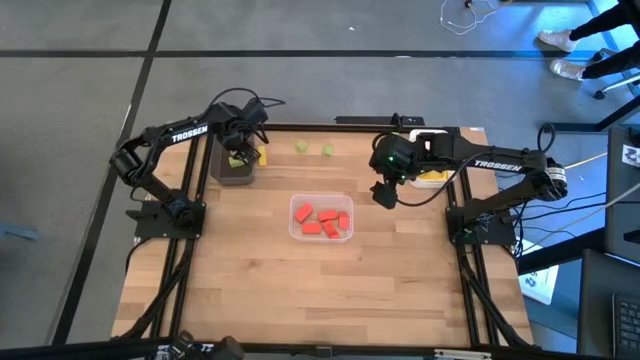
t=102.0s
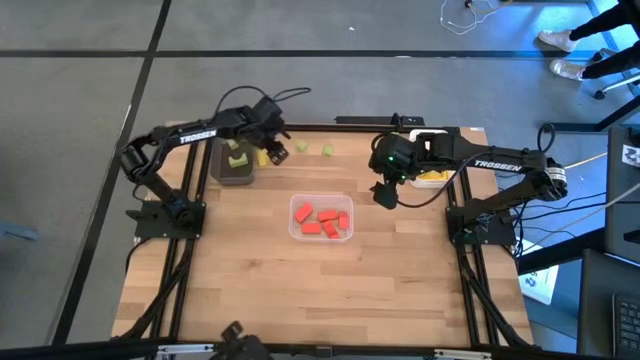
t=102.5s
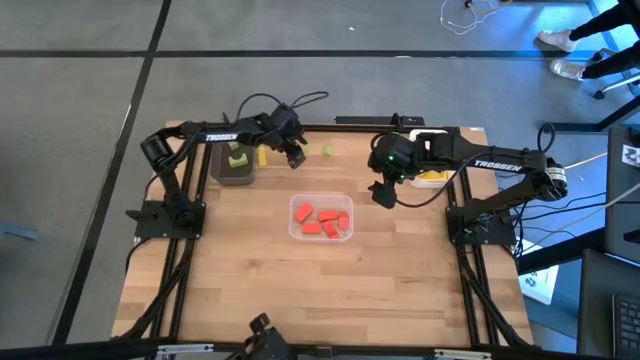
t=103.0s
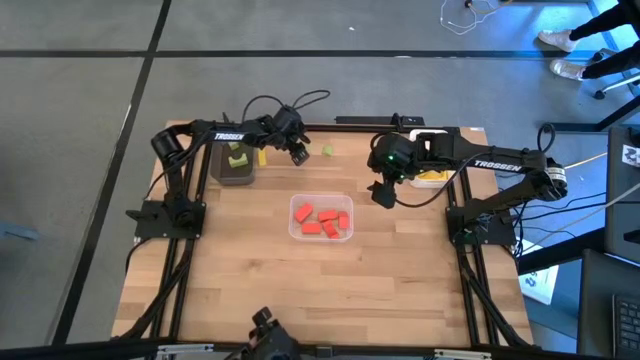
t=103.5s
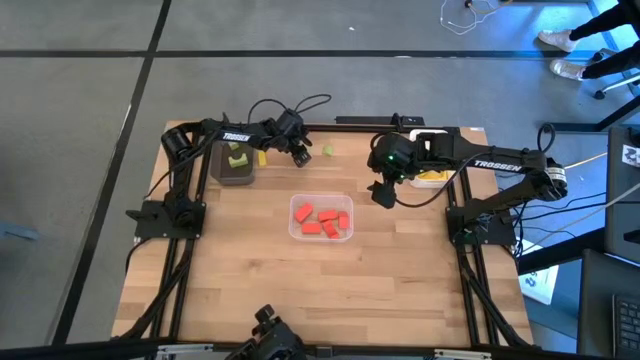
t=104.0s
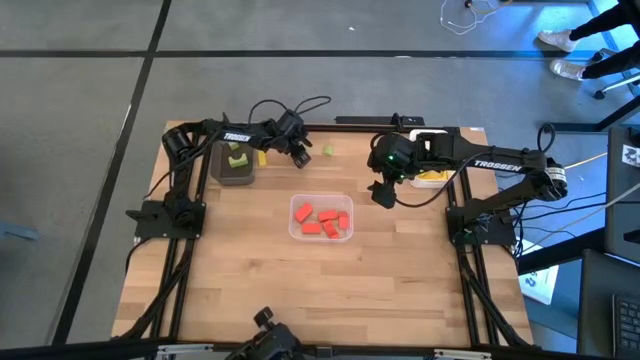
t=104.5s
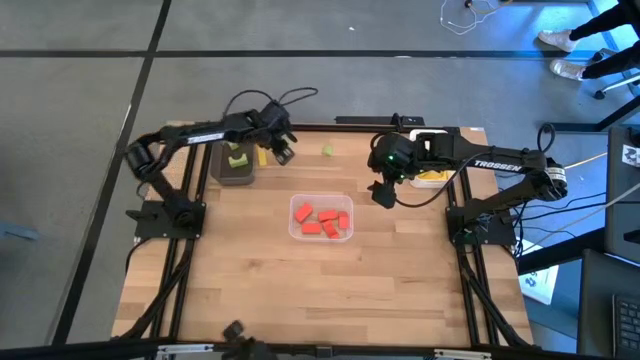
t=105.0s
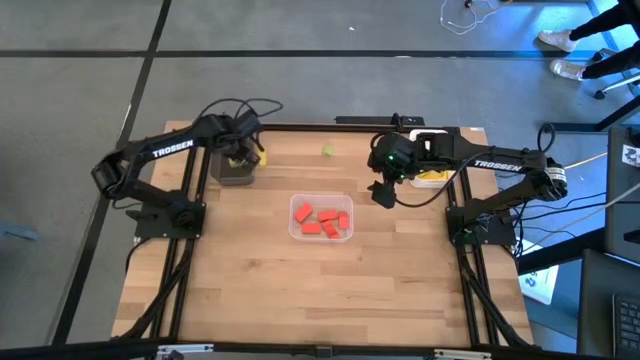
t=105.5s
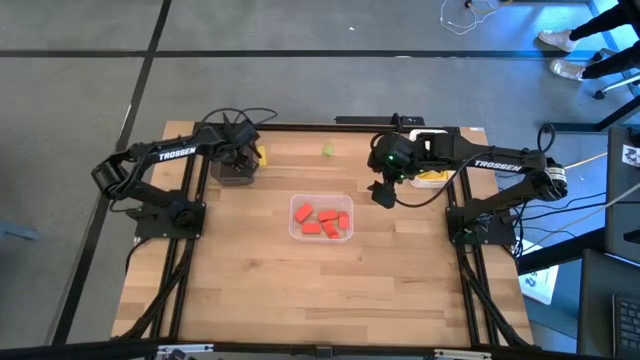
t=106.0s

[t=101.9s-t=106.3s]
Task: Sort & place blocks by color
Put the green block into the black bin

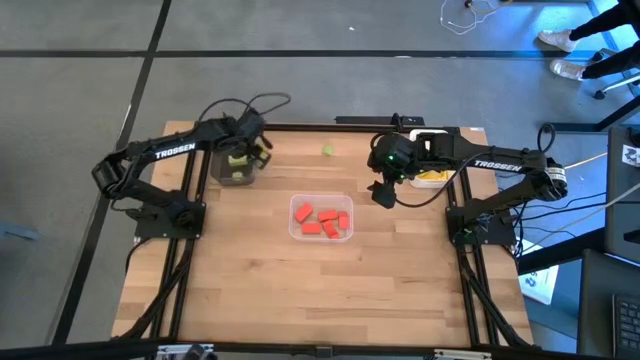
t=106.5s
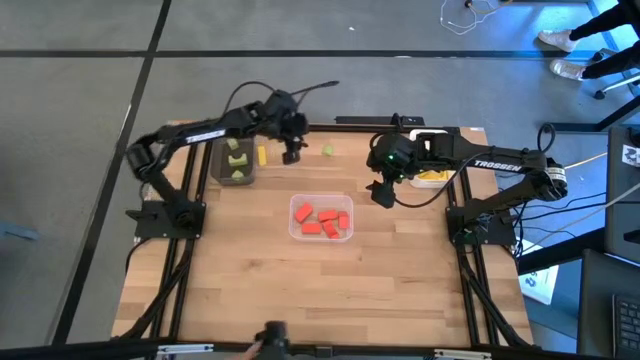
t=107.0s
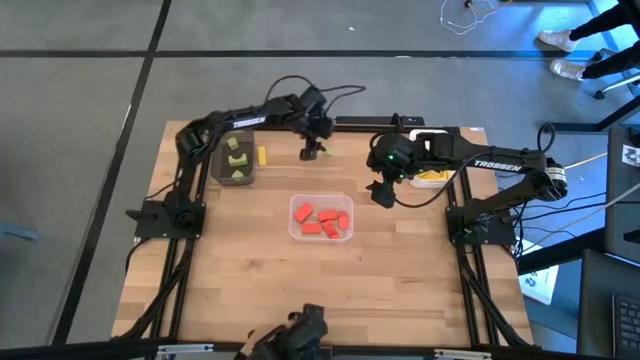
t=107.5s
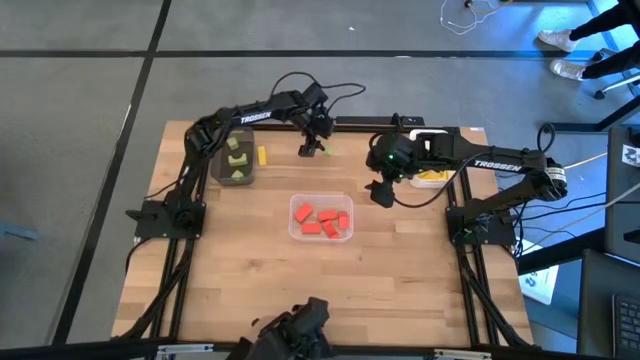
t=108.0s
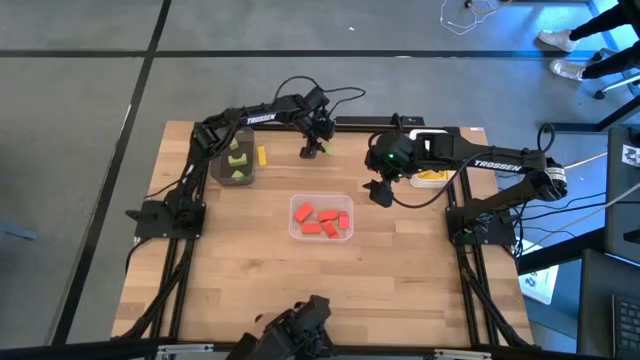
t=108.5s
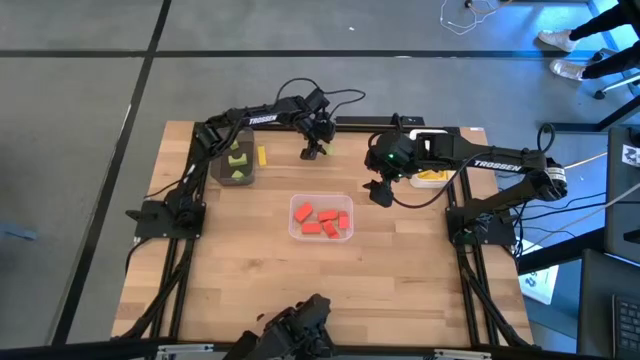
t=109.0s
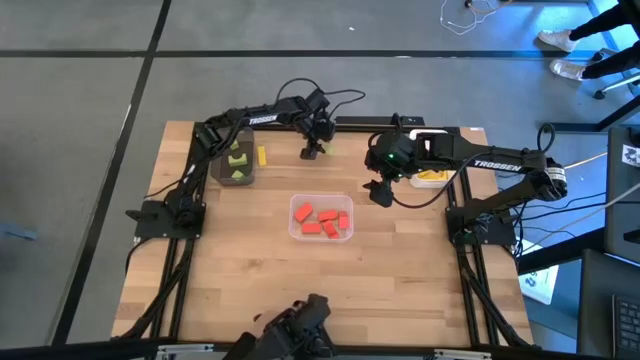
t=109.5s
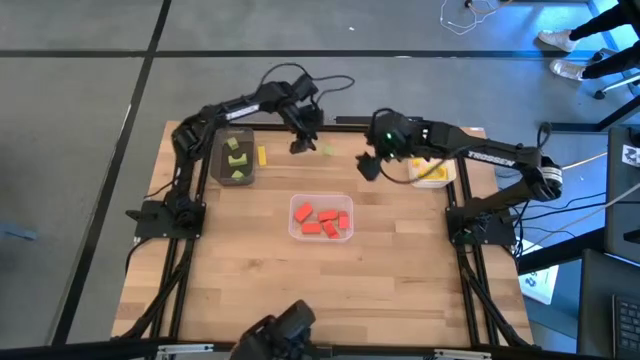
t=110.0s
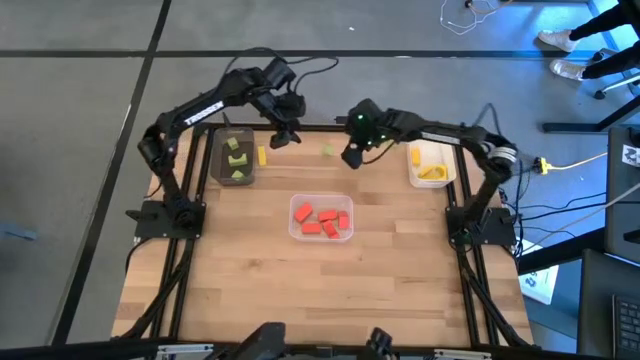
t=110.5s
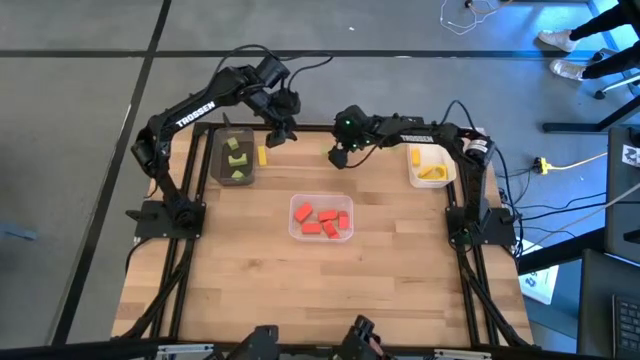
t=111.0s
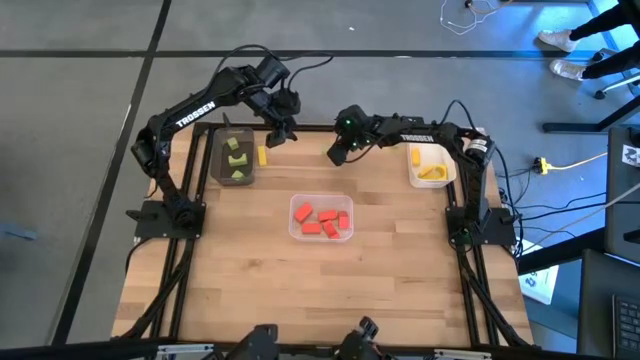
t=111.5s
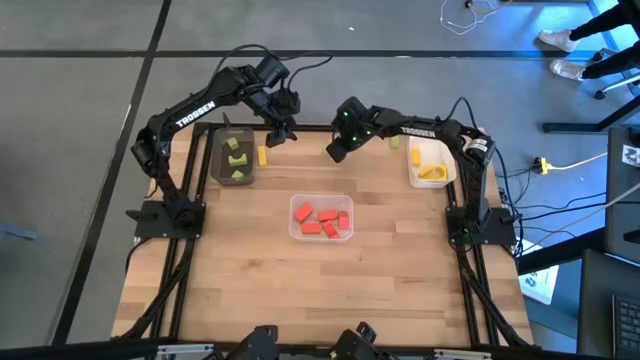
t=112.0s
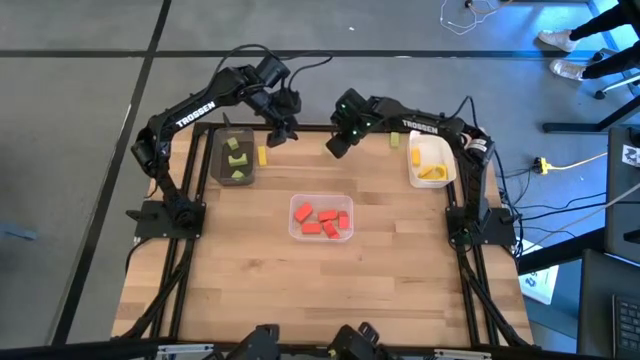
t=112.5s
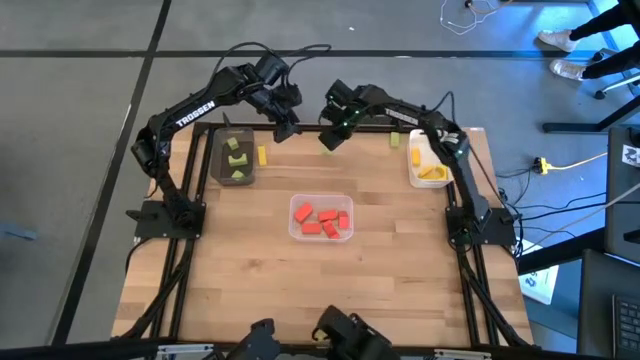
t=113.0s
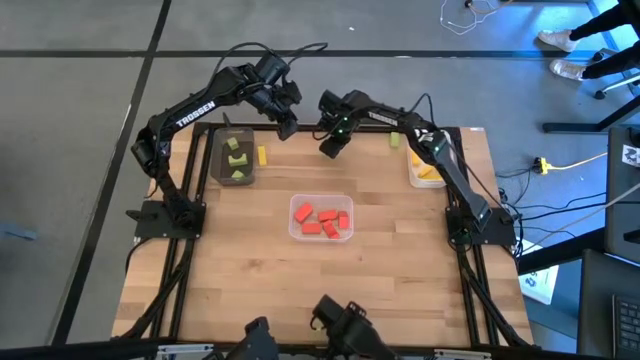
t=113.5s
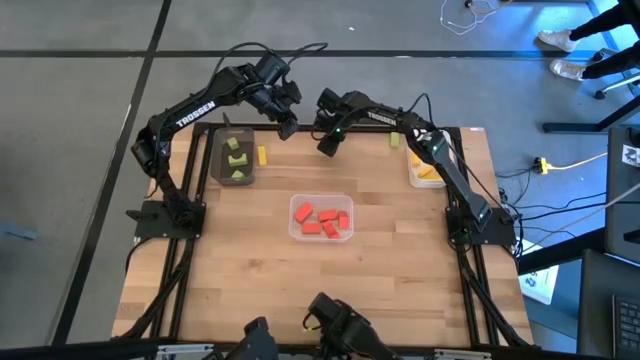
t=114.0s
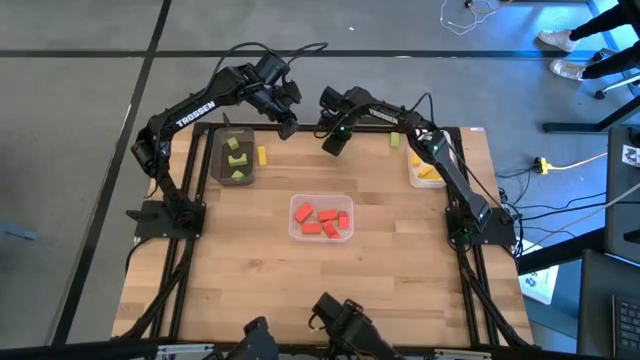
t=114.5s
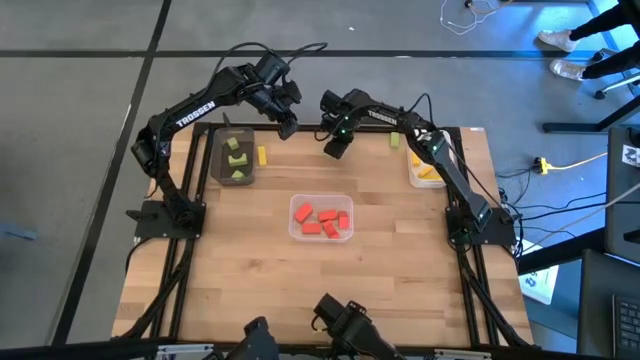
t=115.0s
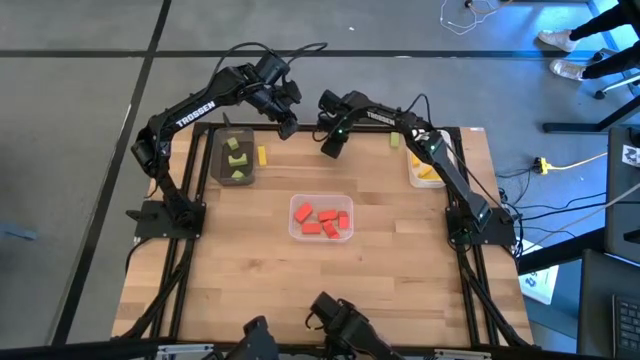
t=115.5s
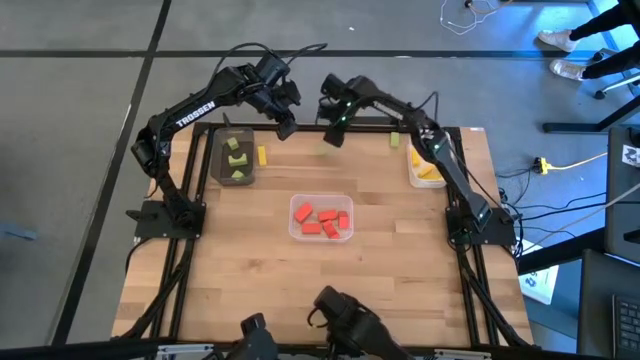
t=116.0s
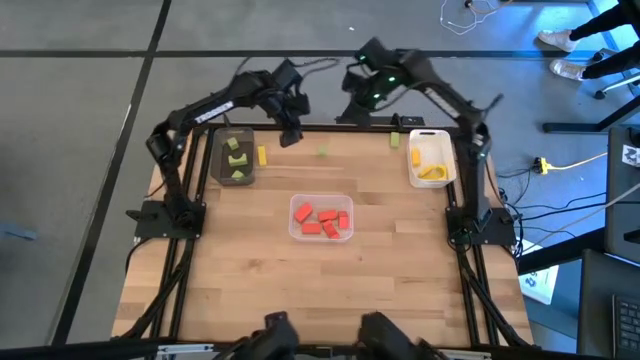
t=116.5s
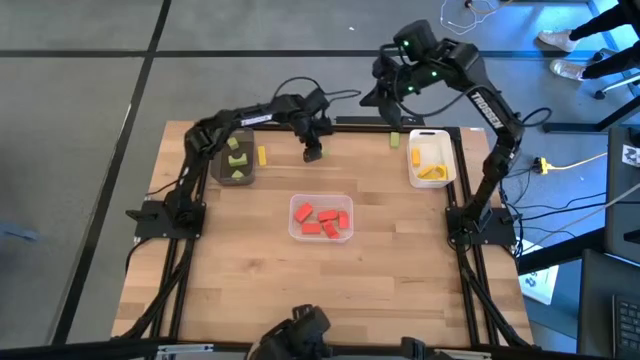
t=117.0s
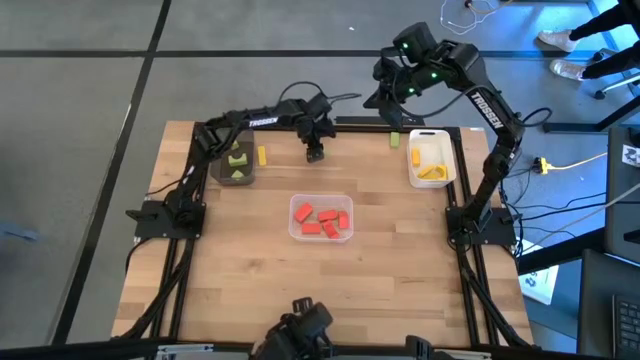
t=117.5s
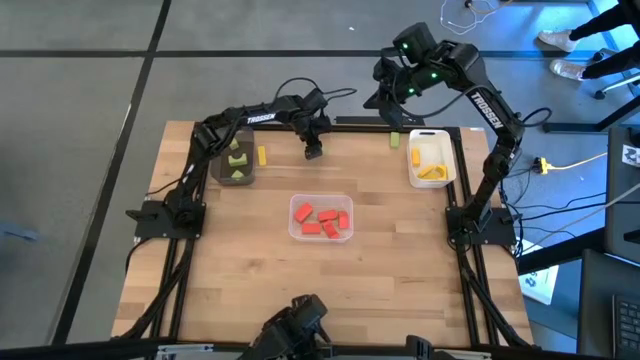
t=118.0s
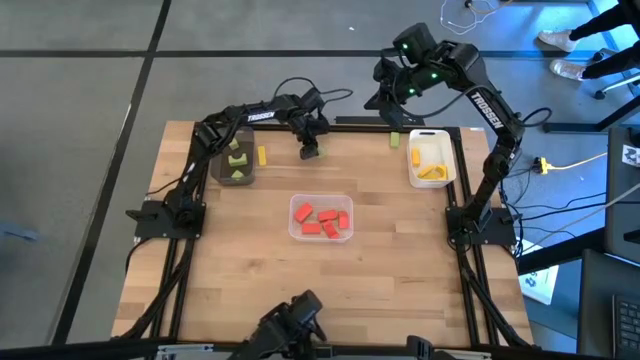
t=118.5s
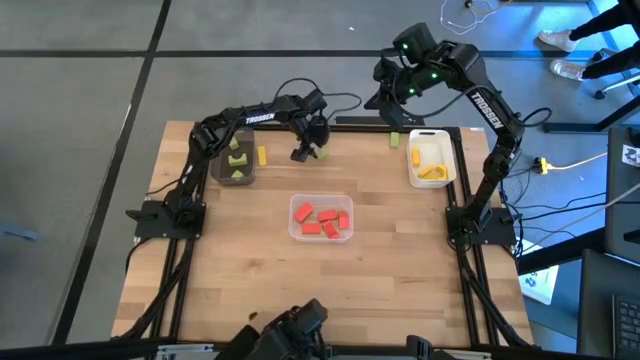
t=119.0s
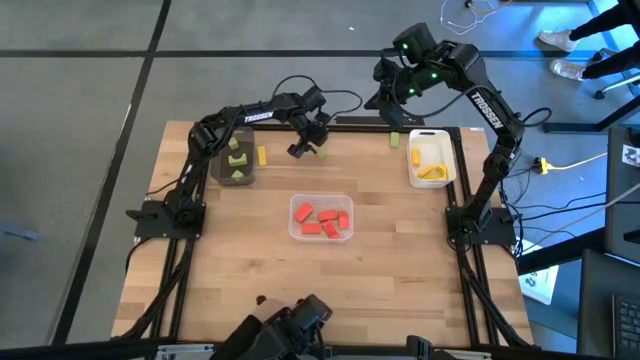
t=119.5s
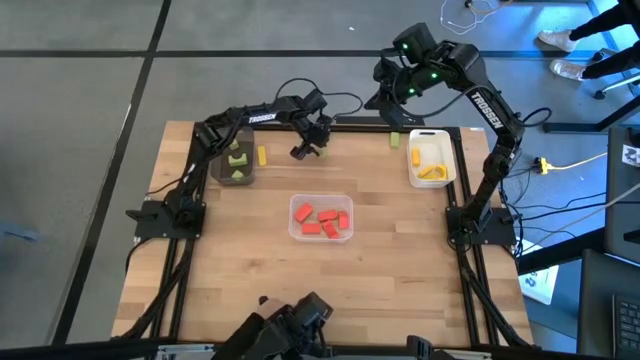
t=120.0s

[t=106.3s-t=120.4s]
Put the green block into the black bin

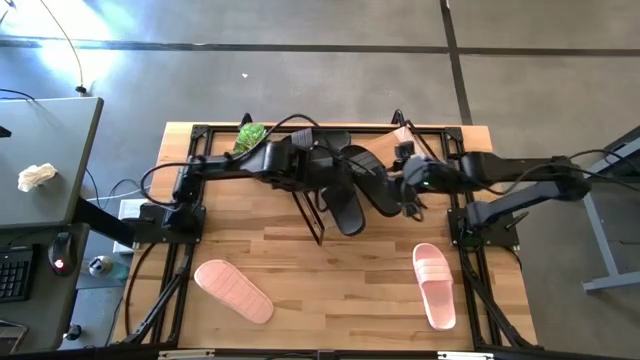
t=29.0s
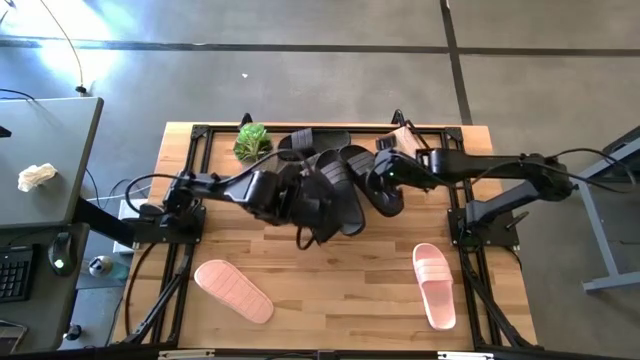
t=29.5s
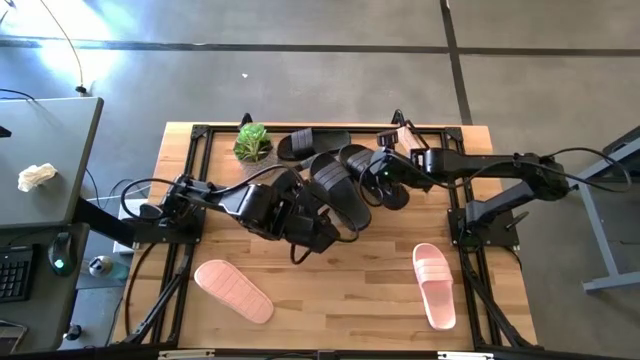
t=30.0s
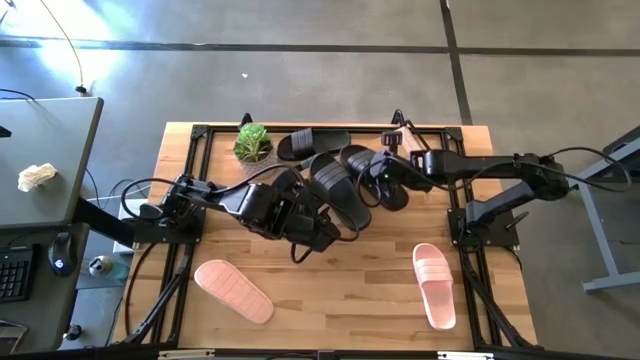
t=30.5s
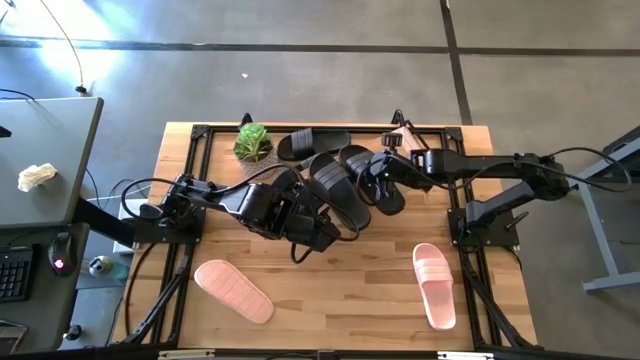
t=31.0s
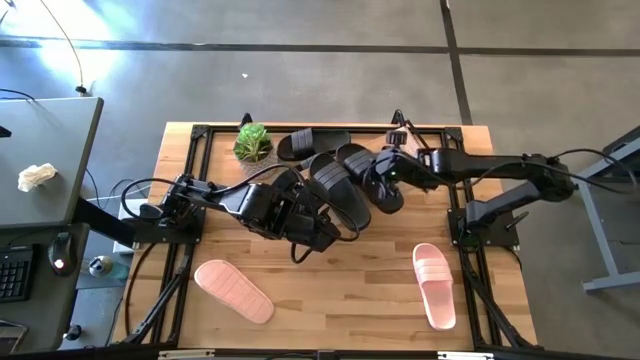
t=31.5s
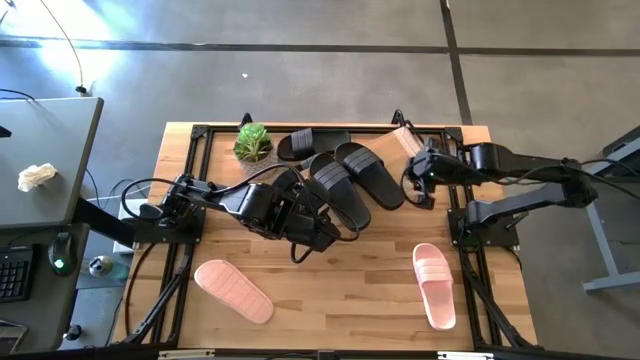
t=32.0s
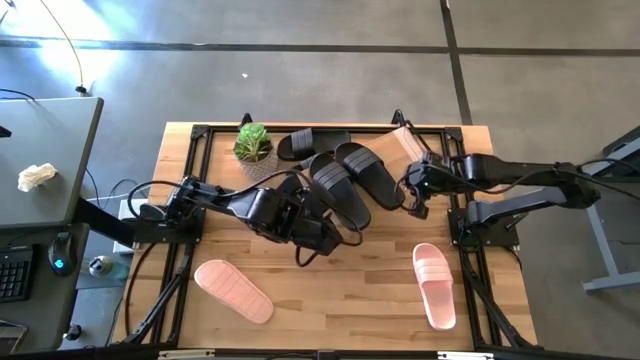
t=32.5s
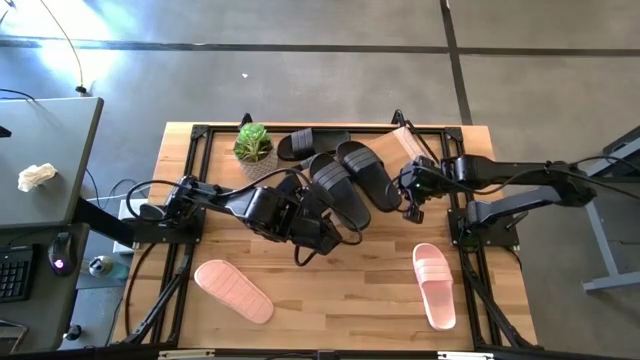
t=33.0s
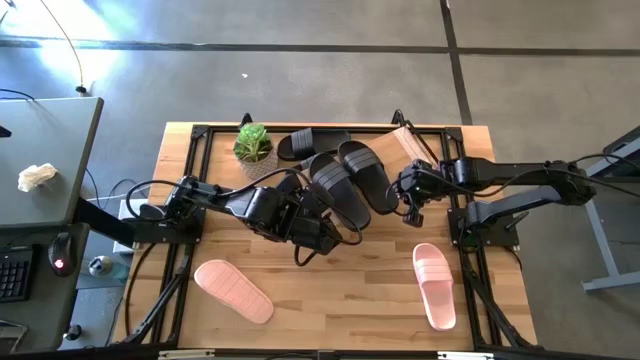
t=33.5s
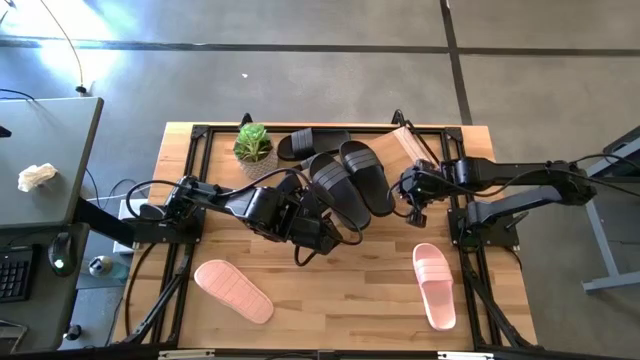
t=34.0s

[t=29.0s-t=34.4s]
Task: Pick and place slides into the shelf
Adjust the right black slipper
